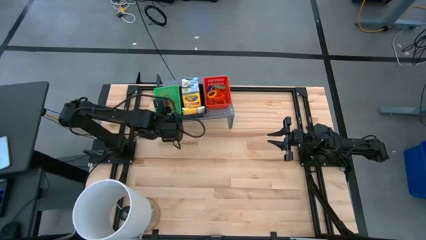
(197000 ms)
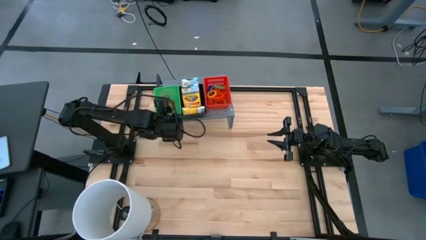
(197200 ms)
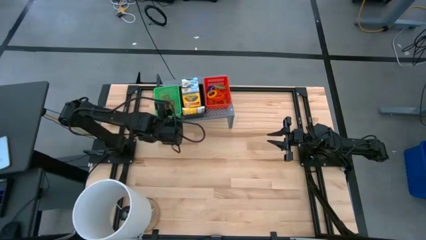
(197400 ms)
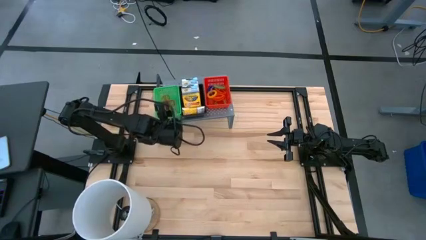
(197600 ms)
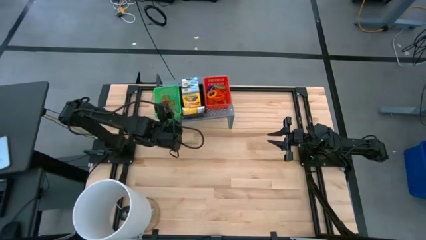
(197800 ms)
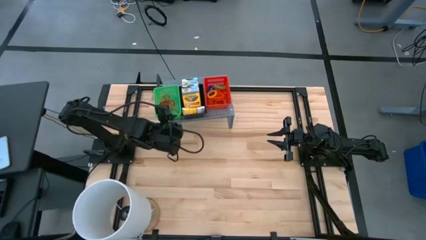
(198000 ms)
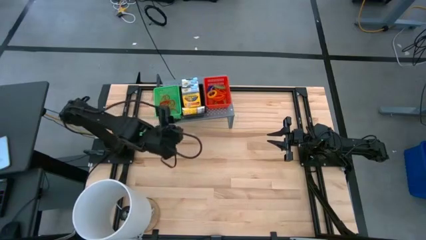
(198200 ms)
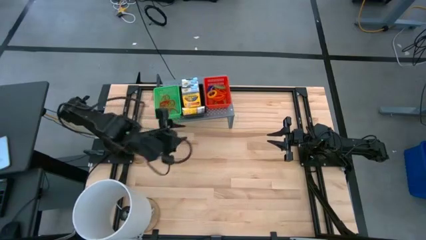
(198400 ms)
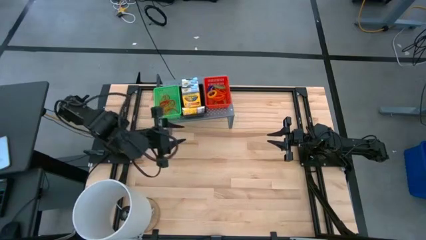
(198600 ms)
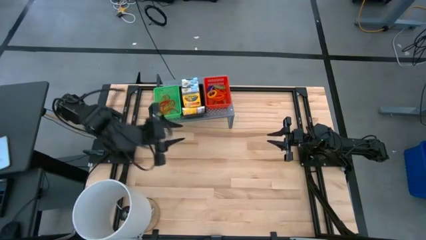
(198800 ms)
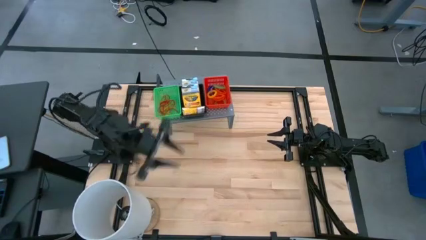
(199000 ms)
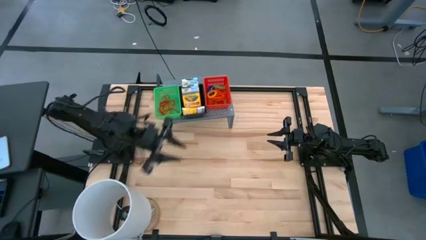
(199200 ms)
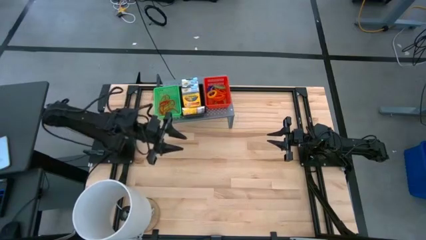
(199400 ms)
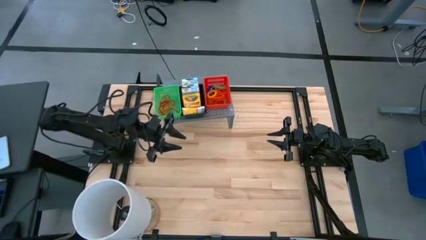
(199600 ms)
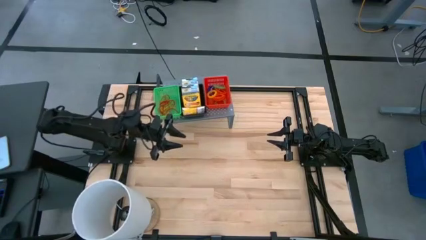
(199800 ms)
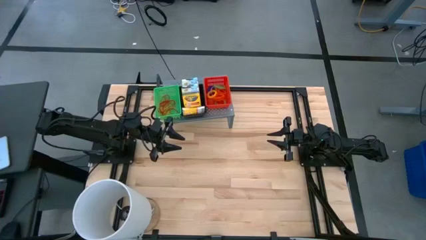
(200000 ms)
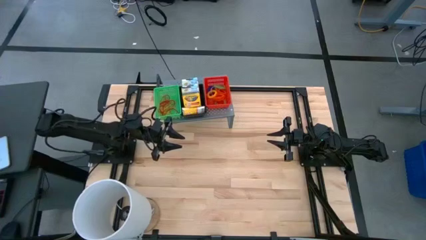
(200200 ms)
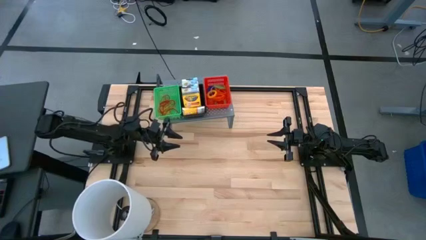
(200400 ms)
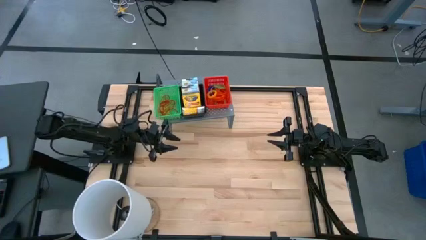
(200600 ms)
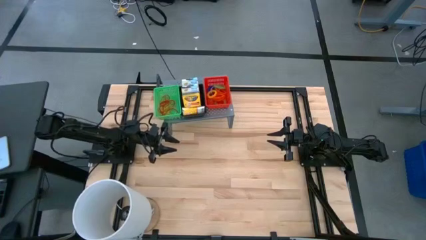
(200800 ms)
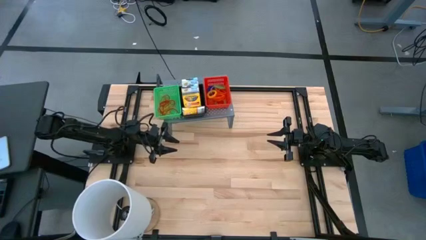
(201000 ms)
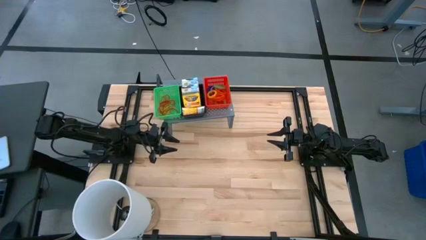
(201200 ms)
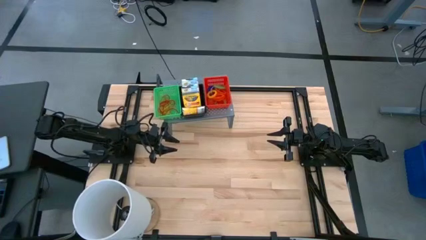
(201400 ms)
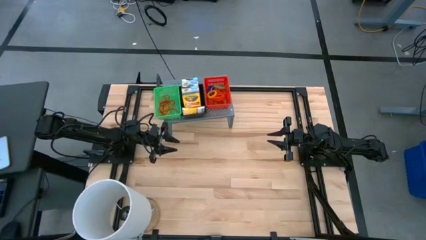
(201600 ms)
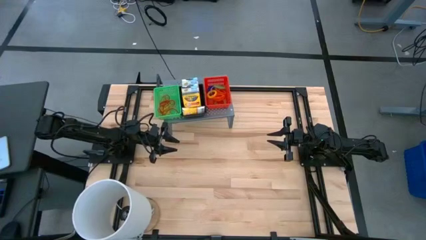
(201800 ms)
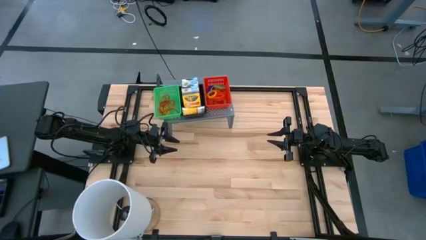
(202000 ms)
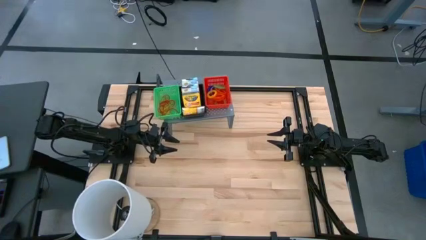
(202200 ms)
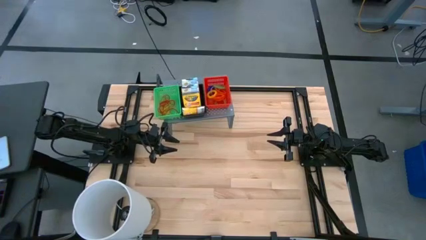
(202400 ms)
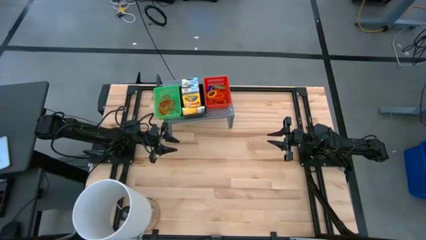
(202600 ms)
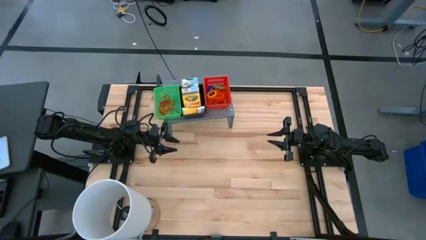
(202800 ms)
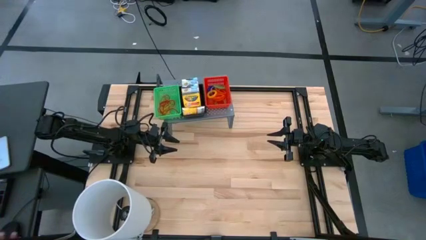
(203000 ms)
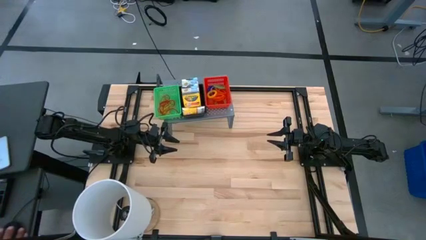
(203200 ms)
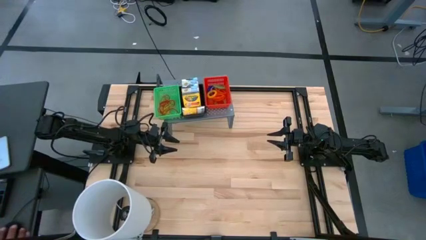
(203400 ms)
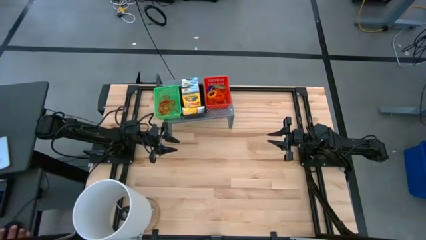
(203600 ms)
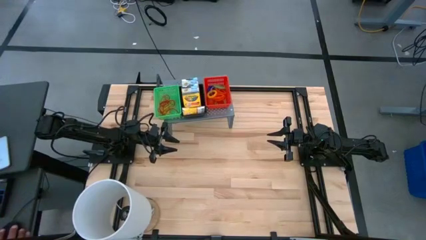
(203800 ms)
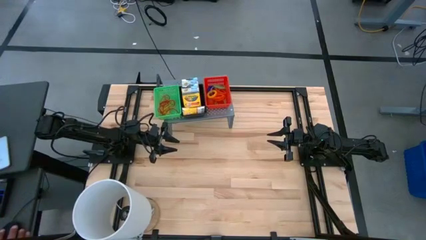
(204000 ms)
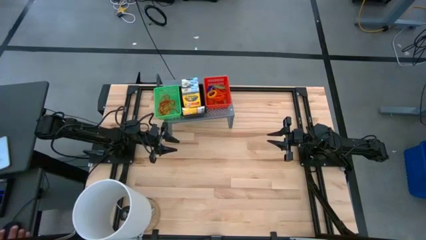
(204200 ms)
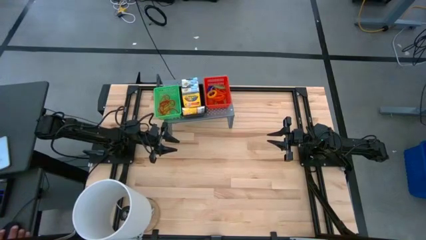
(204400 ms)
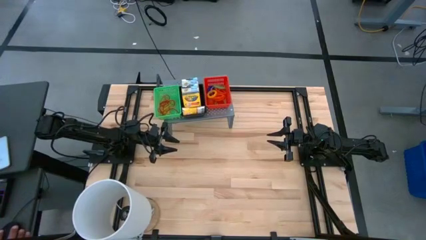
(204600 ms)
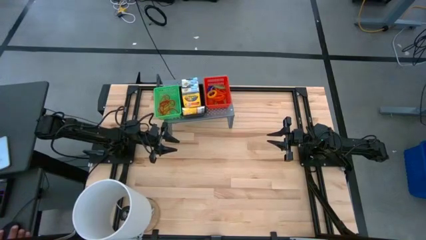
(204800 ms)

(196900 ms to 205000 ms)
Task: Pick & Place Office Desk Supplies
Return to Home Position

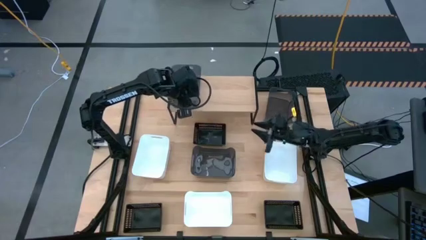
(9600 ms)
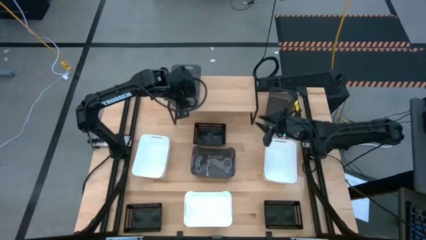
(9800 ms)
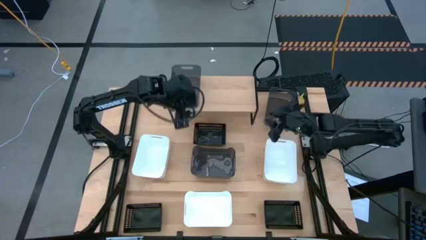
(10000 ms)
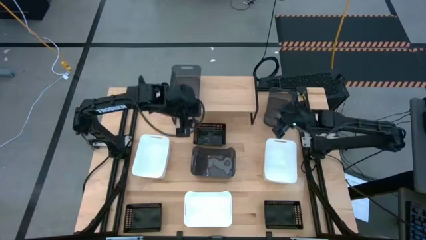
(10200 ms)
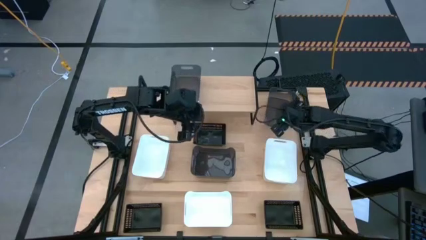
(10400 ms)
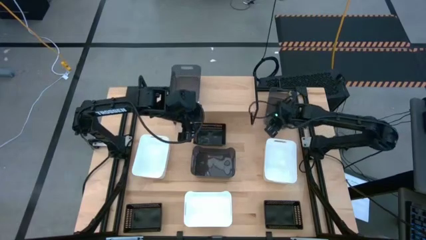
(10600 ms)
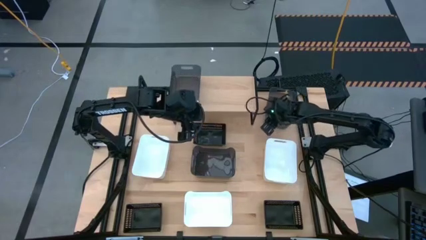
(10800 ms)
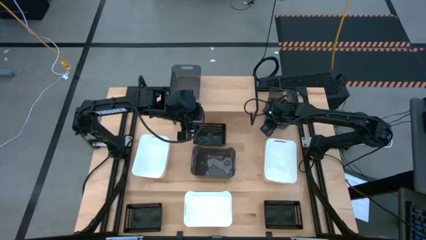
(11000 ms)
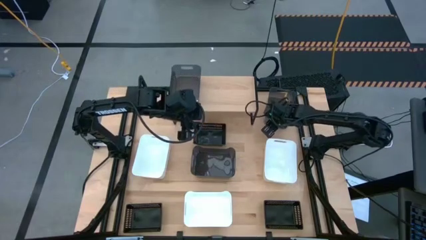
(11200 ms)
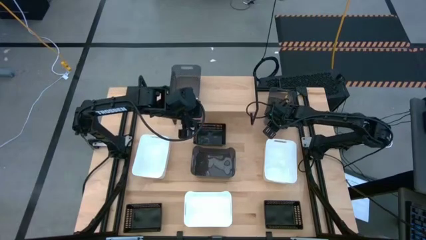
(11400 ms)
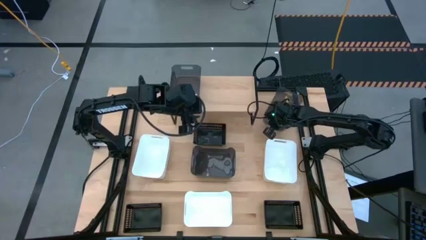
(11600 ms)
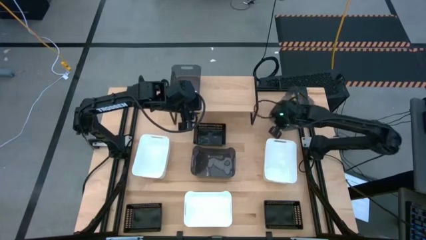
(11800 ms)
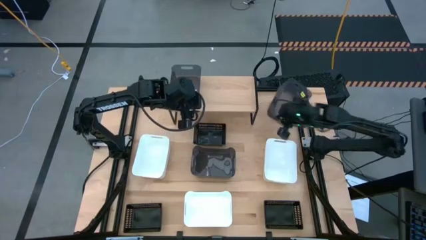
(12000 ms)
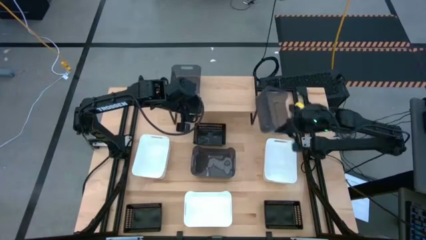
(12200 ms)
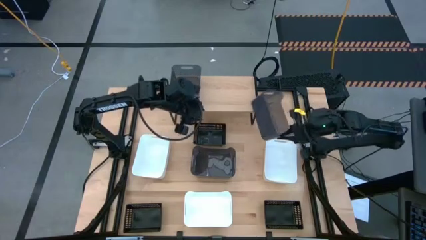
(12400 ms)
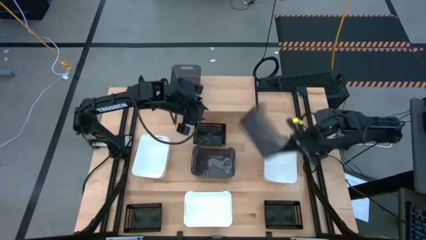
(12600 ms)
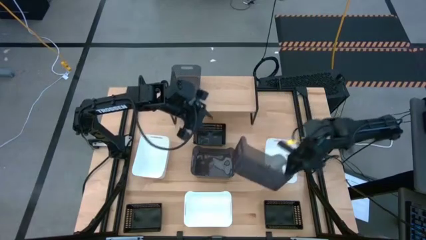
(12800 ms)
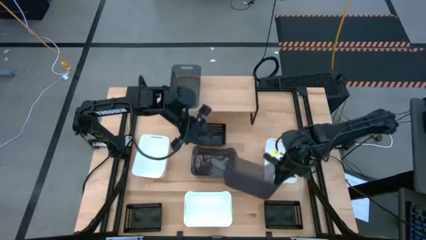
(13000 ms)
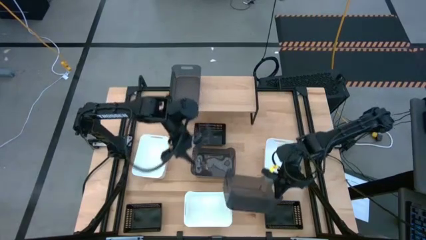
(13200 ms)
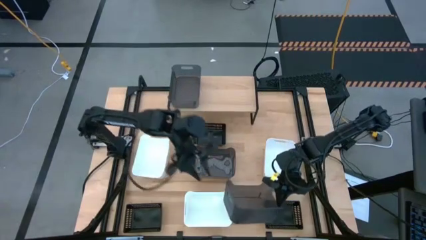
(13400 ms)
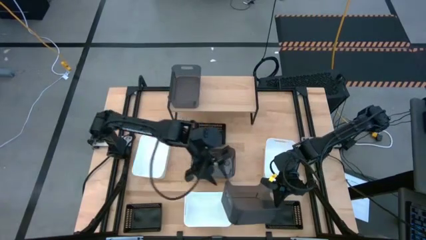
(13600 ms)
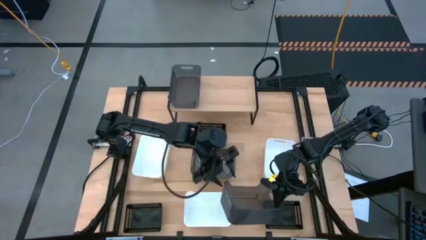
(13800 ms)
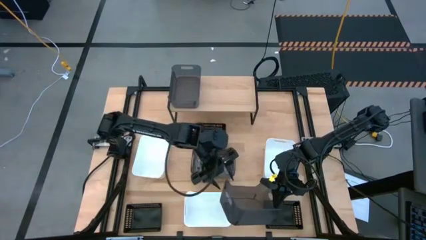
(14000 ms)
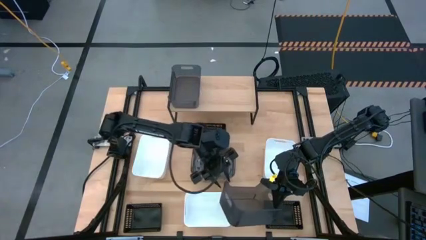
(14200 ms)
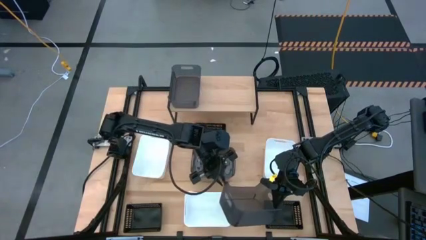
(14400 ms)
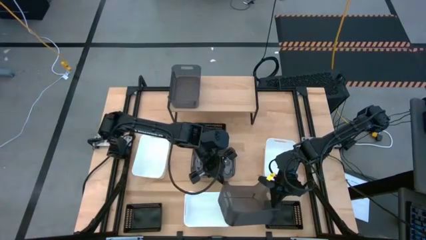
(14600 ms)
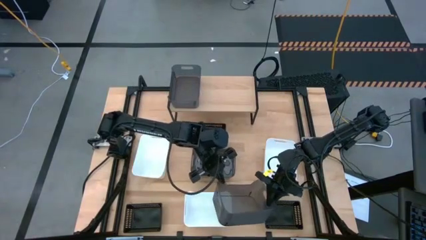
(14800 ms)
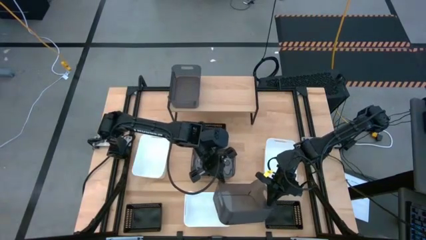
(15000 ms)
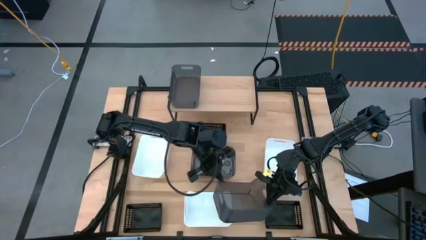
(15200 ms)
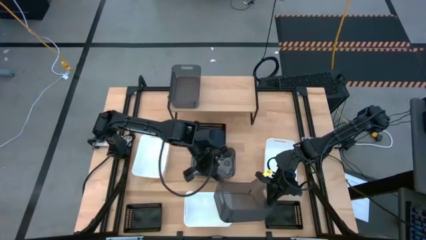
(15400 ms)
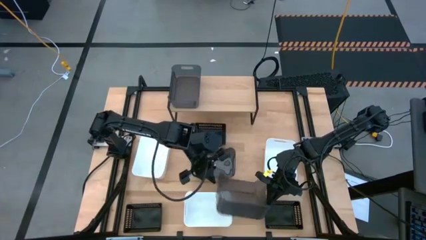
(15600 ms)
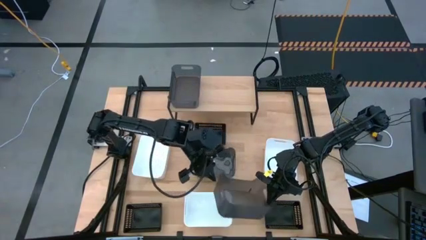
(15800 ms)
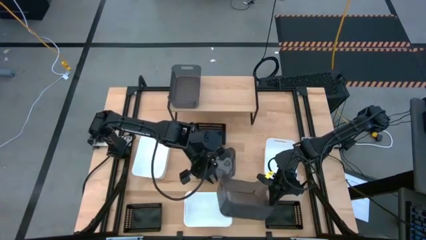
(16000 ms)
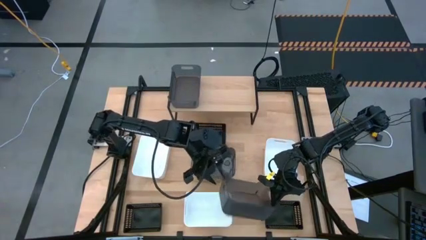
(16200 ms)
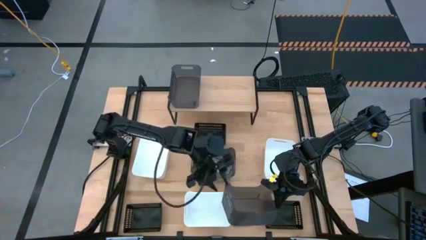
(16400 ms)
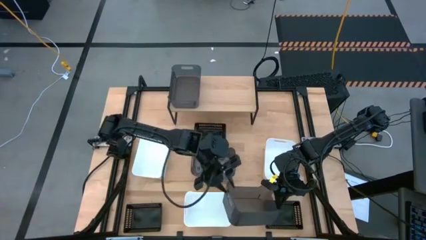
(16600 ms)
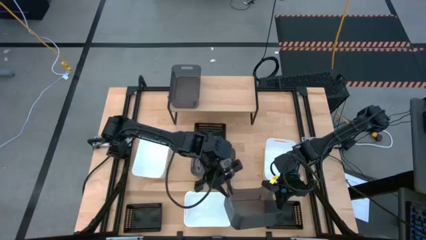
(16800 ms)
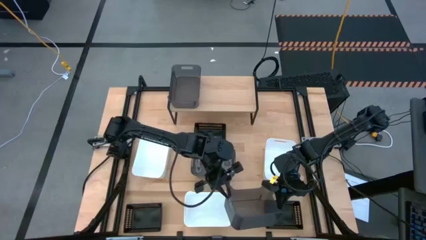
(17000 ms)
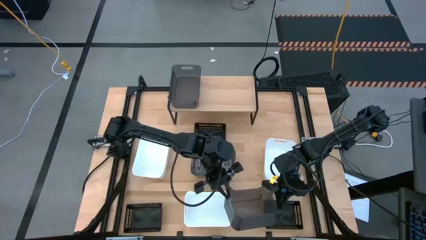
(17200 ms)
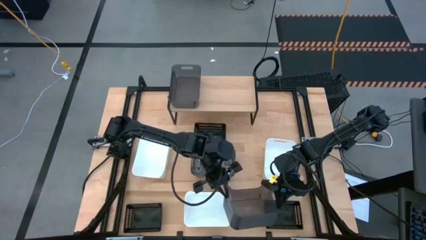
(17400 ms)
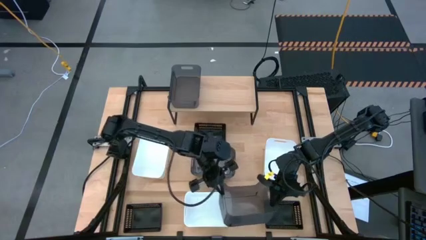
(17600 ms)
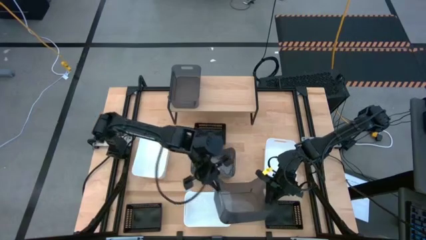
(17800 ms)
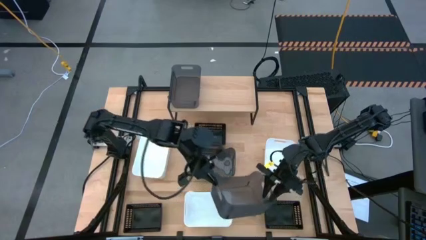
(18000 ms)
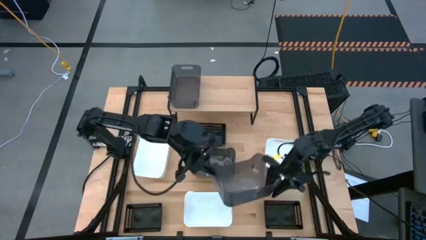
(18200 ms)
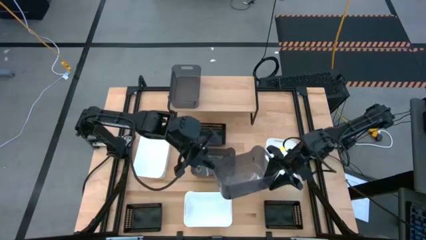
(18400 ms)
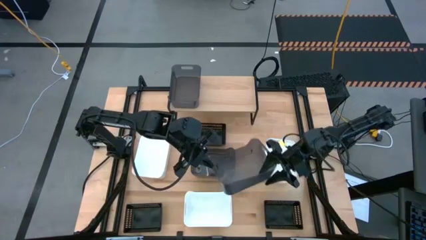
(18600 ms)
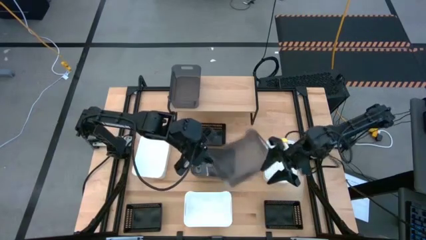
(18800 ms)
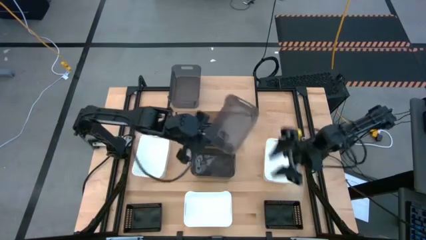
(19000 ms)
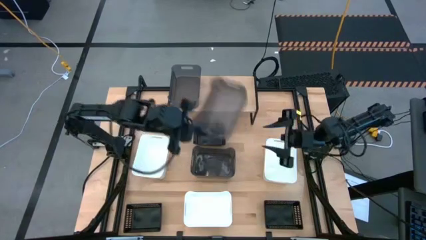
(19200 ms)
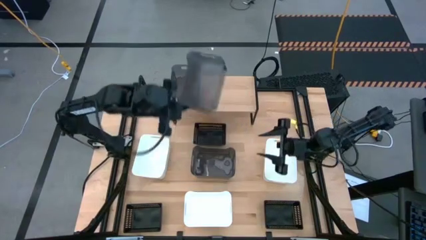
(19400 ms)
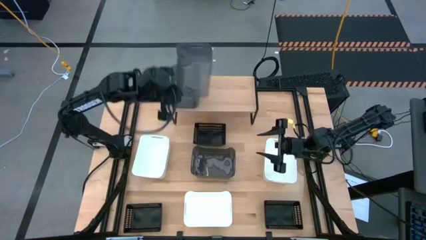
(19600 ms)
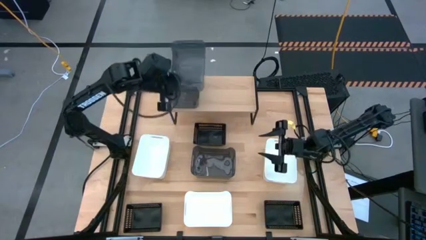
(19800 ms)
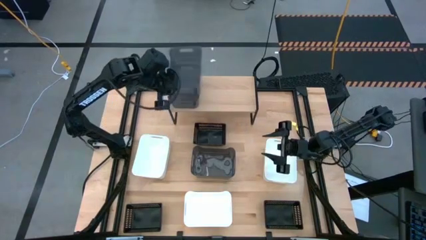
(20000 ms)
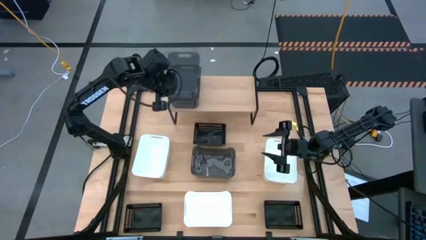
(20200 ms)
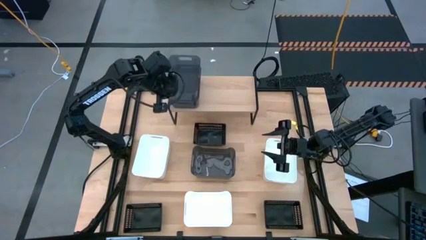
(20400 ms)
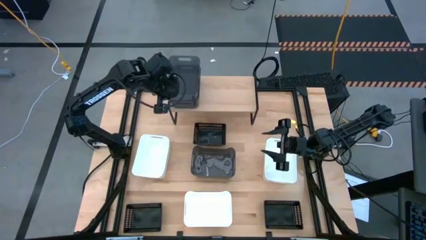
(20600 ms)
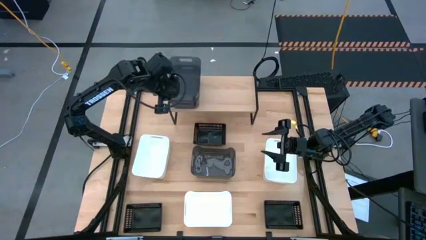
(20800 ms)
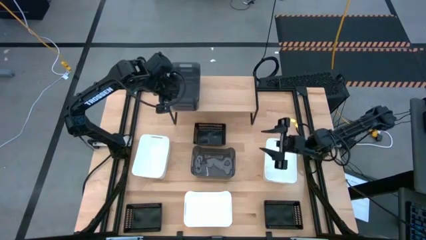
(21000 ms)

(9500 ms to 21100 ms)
Task: Stack baskets on shelf by color
Stack the top gray bin on top of the gray bin on the shelf
